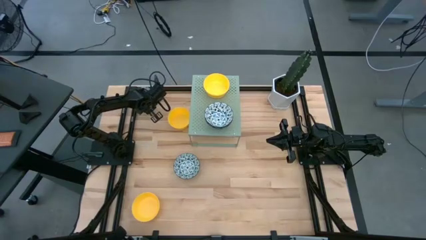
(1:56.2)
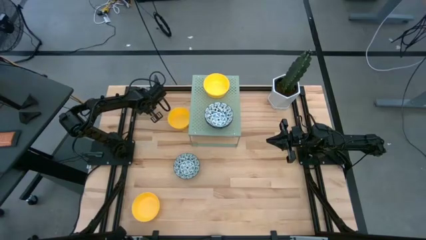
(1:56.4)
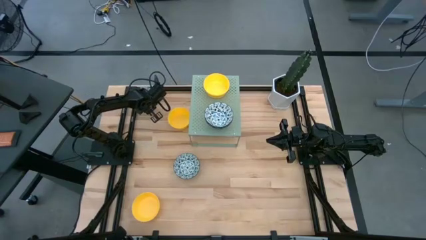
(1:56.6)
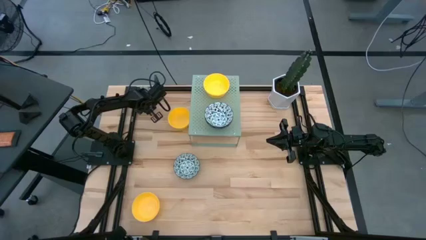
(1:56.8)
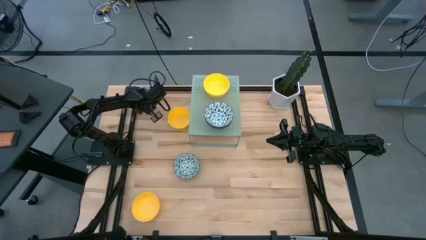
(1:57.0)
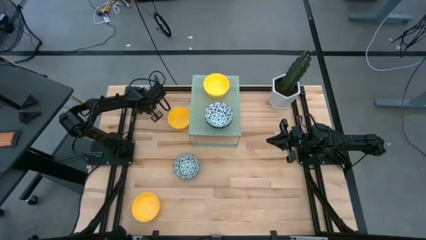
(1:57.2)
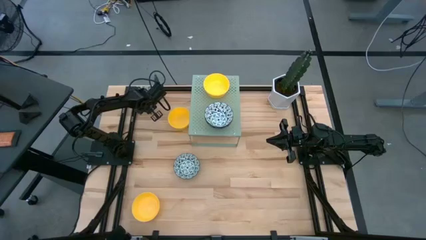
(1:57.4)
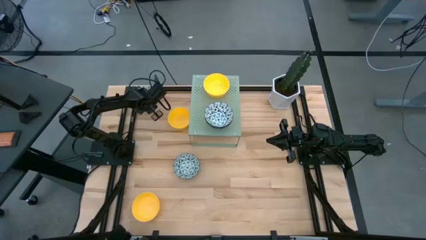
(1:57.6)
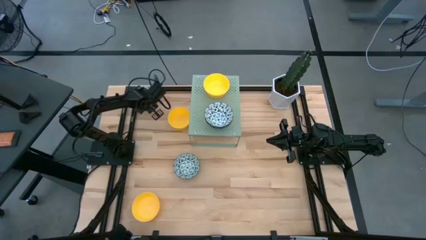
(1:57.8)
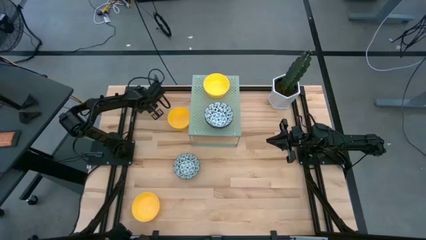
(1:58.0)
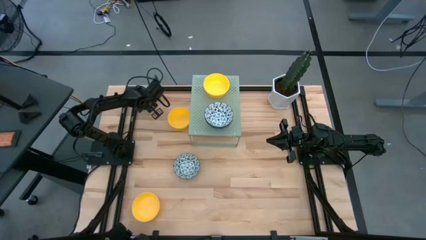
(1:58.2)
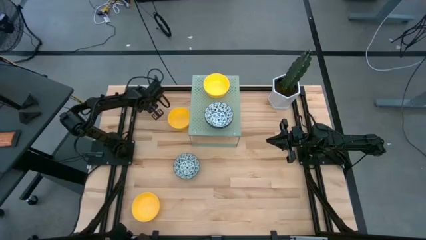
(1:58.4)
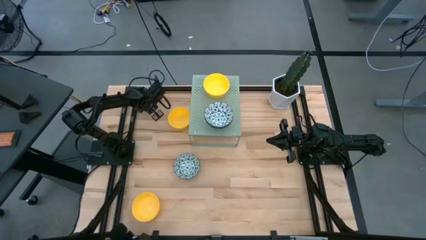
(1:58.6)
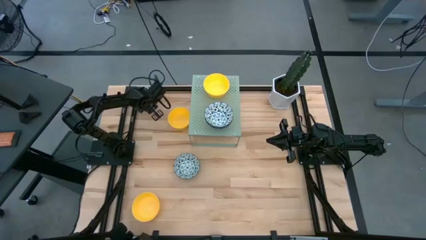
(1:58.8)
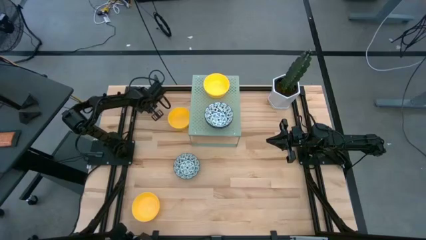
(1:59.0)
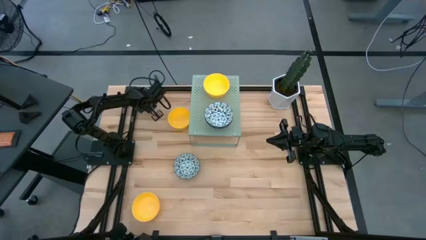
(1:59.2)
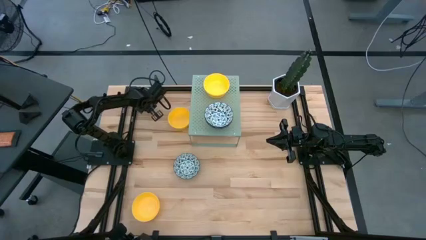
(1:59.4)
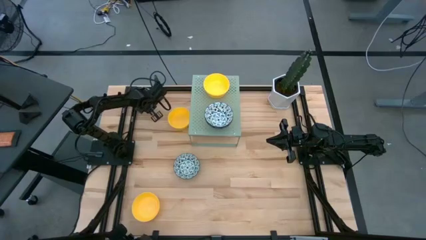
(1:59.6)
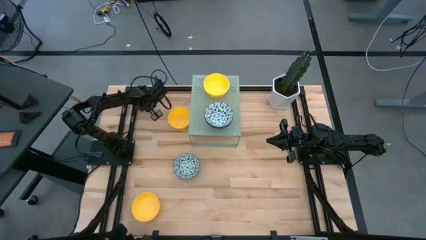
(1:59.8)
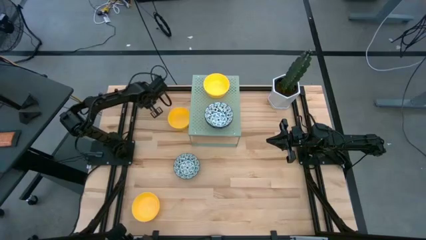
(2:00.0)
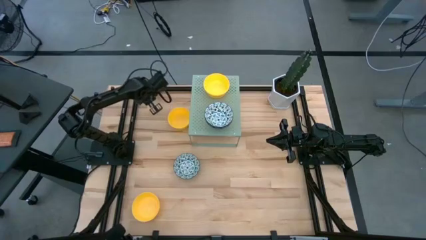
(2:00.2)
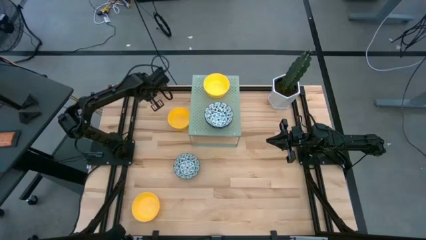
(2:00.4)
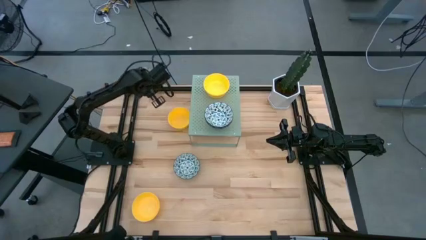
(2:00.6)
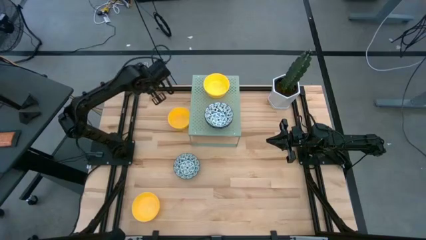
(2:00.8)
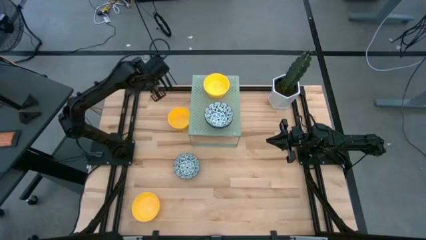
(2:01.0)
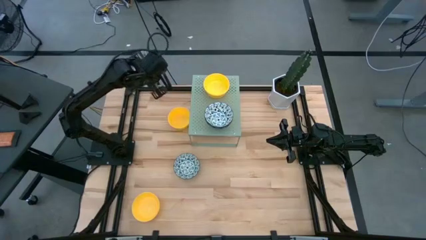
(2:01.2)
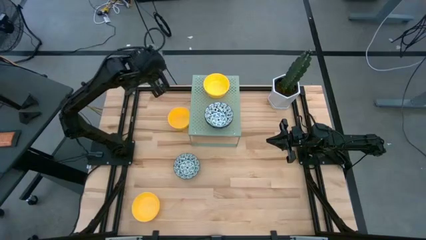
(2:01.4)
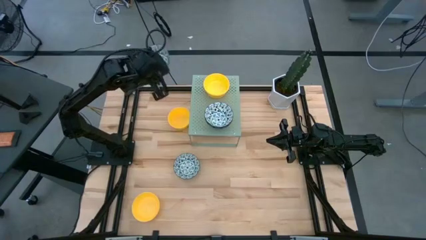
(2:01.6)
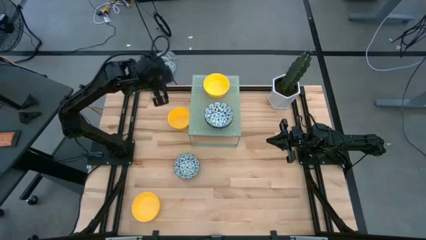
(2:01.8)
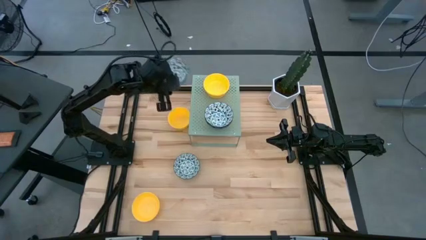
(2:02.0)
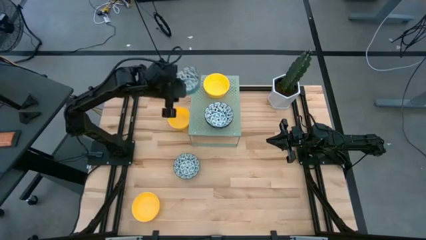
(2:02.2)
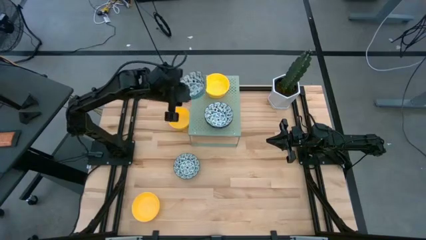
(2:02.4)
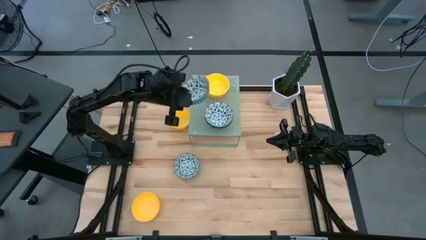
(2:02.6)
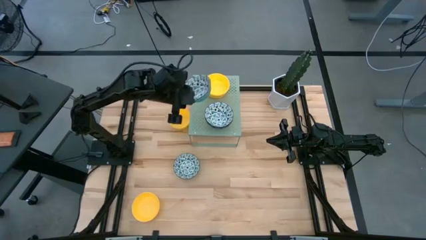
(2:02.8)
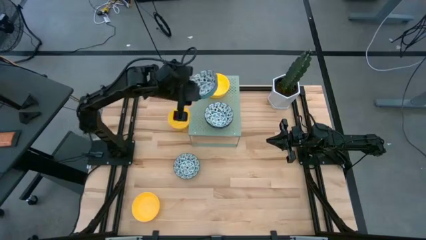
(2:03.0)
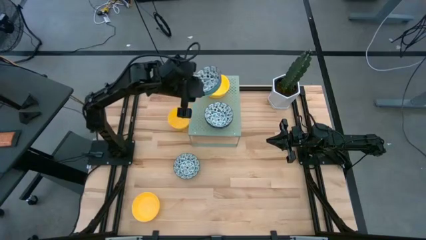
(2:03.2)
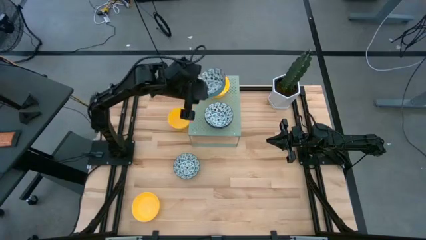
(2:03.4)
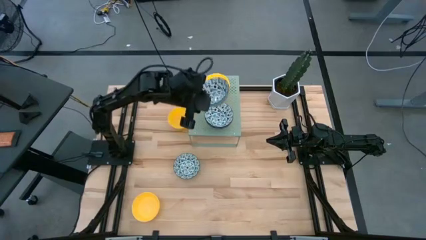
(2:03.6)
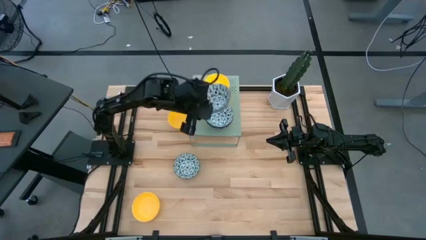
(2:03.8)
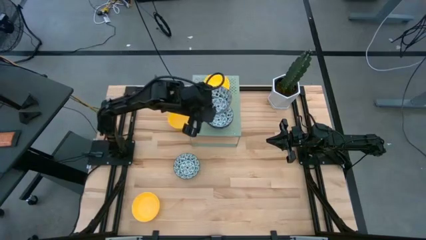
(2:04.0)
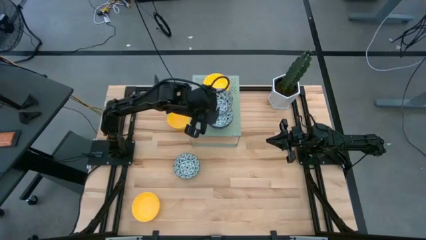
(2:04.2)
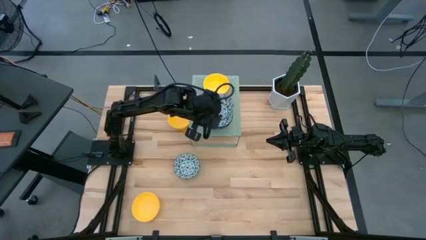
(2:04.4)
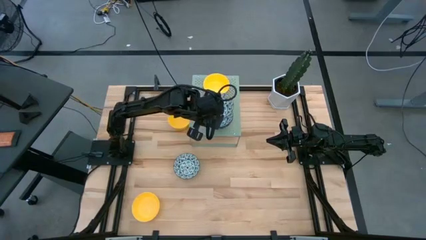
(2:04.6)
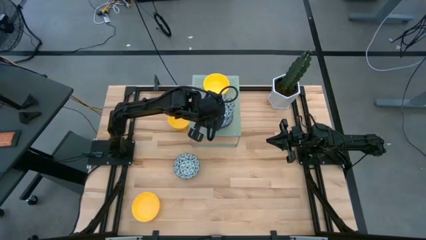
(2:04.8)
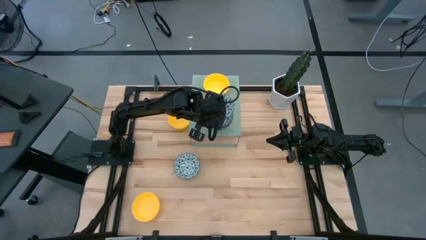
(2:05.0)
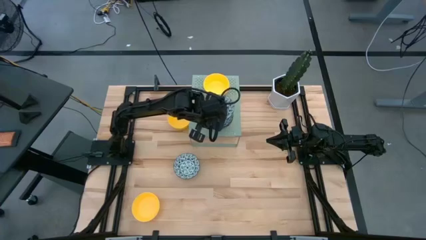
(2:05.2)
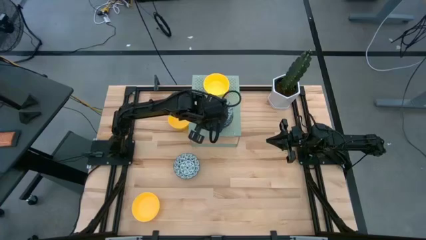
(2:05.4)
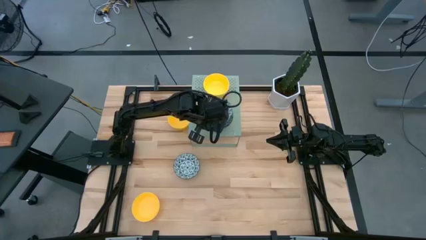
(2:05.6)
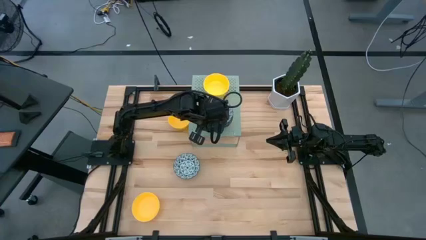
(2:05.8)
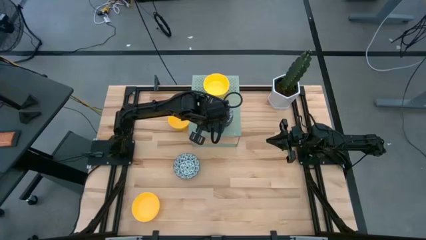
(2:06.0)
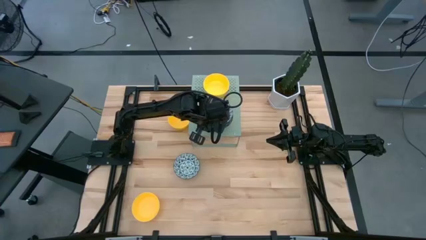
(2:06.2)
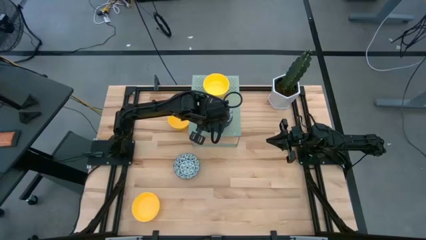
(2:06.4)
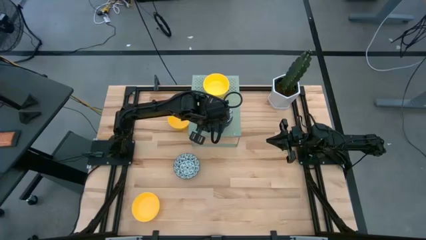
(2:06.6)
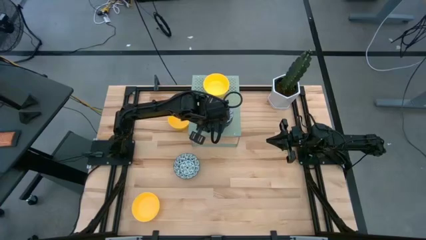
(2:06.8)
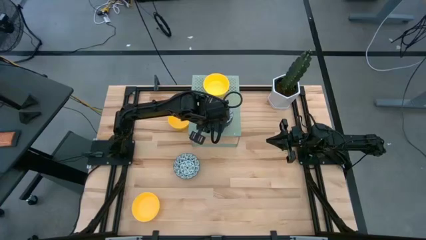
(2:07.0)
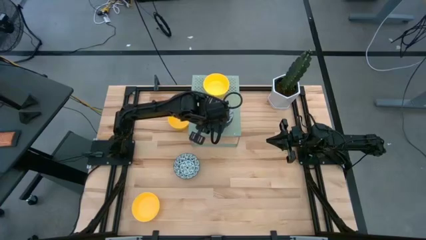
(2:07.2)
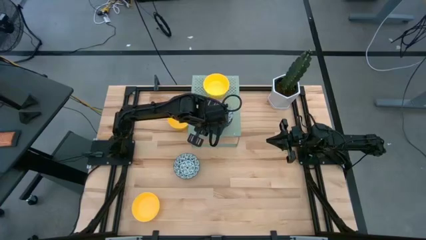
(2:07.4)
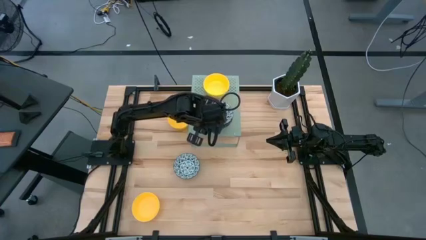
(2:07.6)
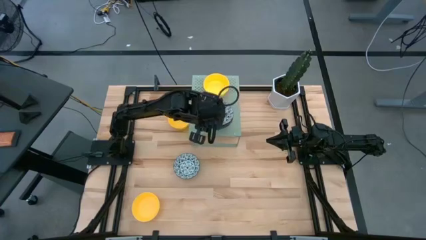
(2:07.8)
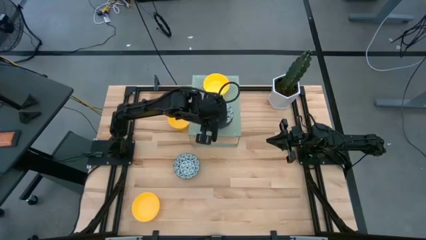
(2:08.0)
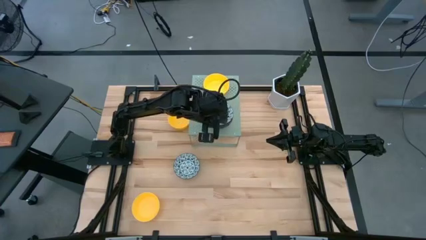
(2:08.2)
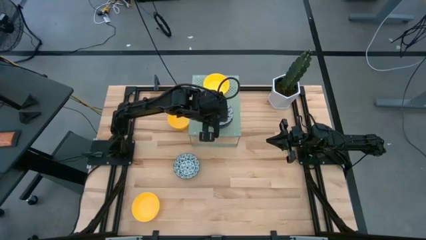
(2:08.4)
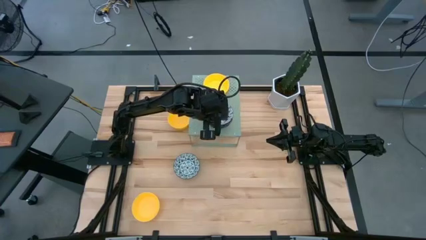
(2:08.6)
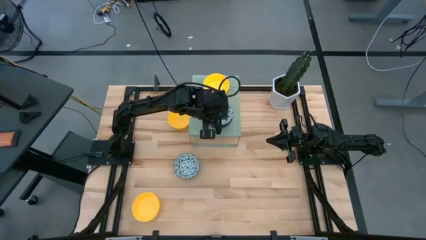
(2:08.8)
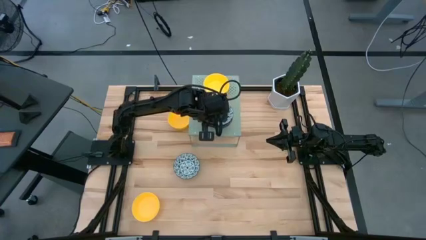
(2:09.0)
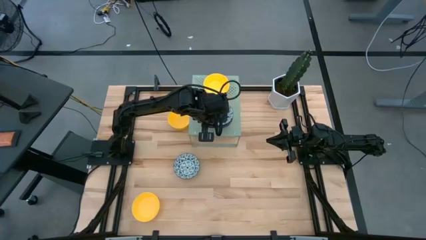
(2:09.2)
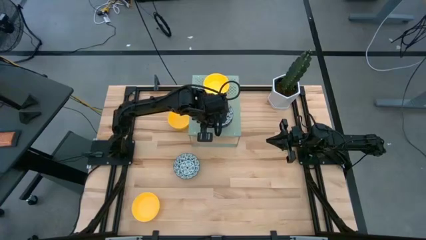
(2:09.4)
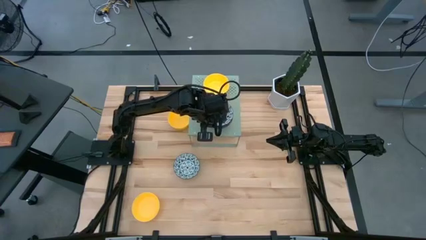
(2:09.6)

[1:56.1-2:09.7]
Task: Pick & Place Mini bowls
Stack the blue and white bowl on top of the other blue and white bowls on the shelf
